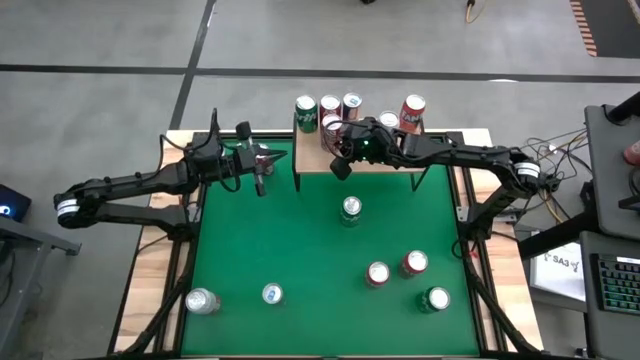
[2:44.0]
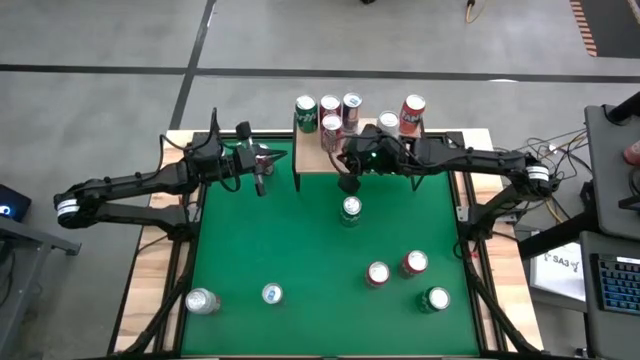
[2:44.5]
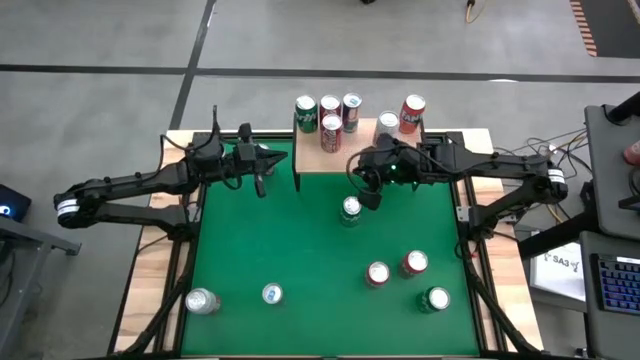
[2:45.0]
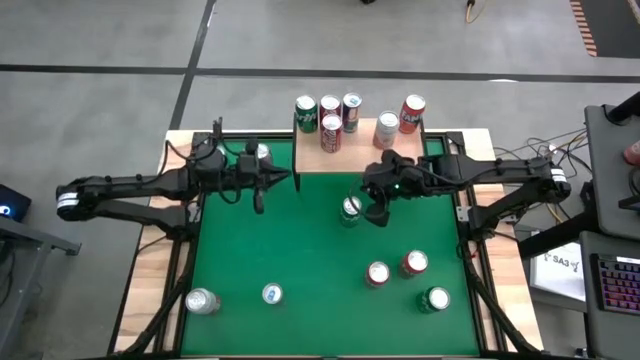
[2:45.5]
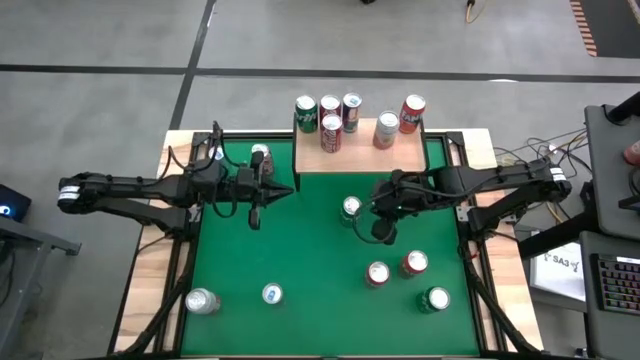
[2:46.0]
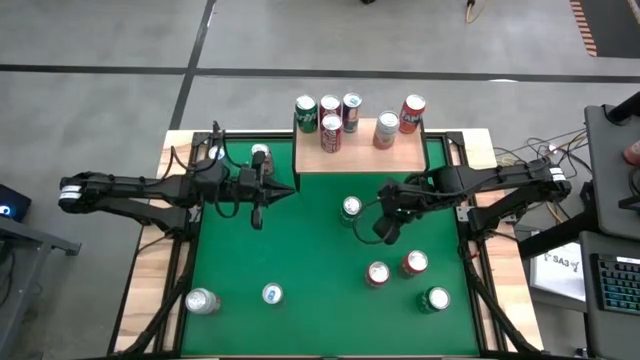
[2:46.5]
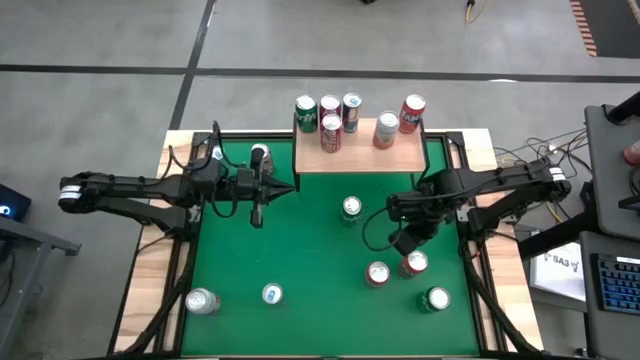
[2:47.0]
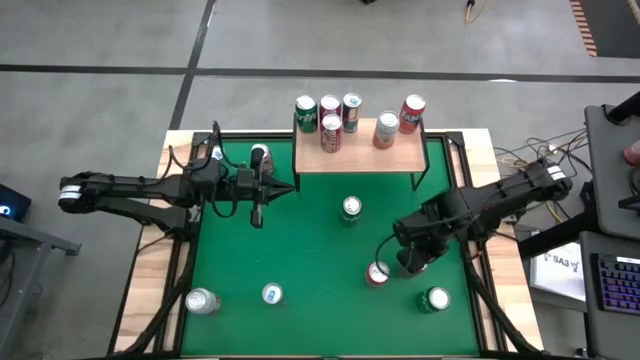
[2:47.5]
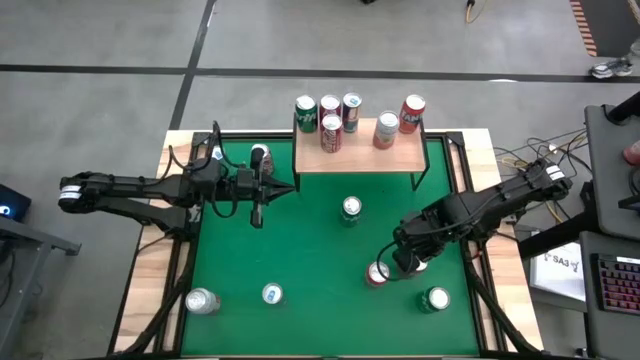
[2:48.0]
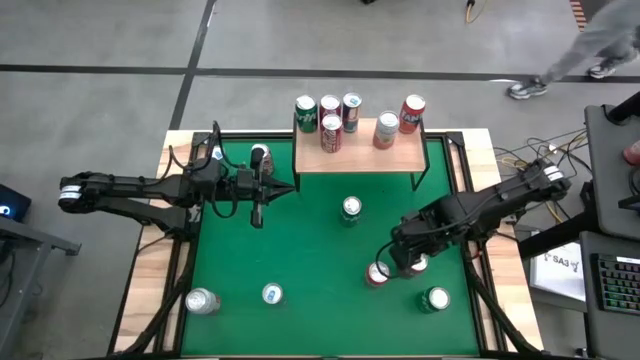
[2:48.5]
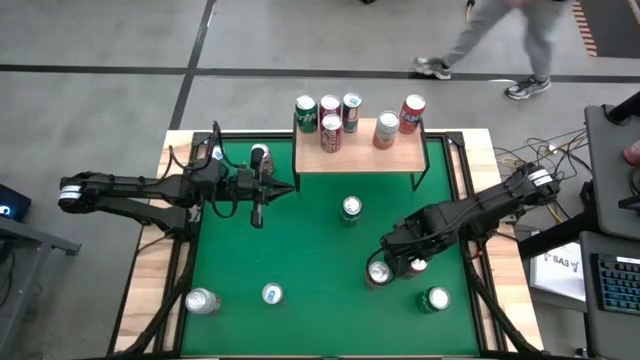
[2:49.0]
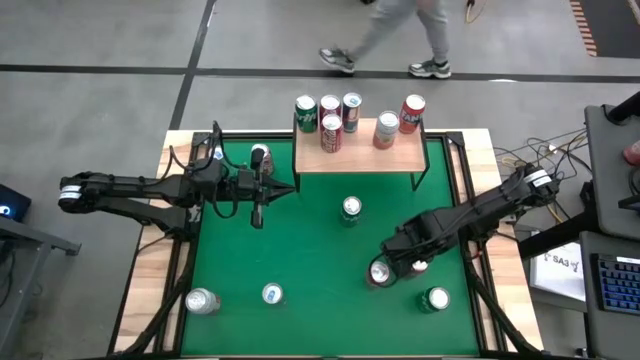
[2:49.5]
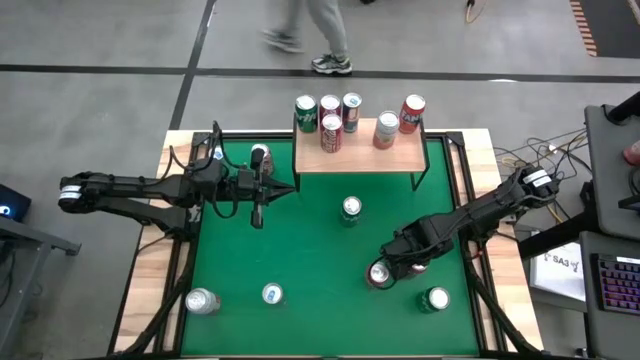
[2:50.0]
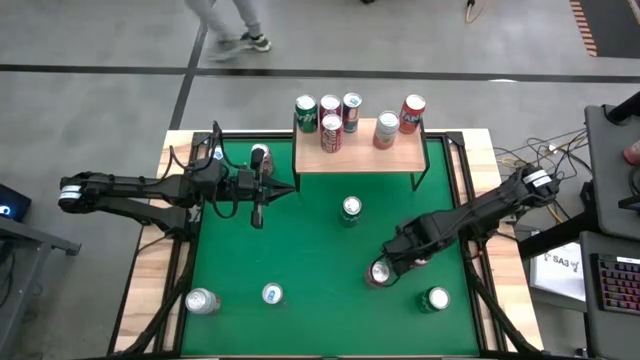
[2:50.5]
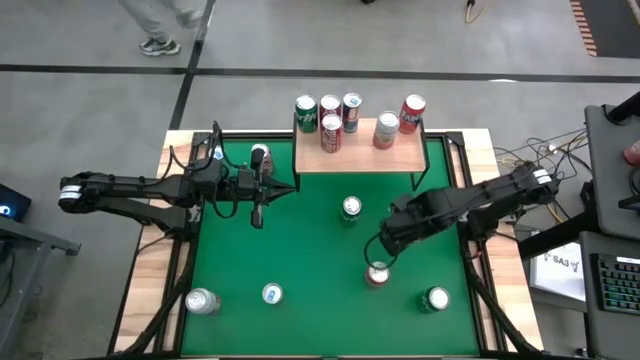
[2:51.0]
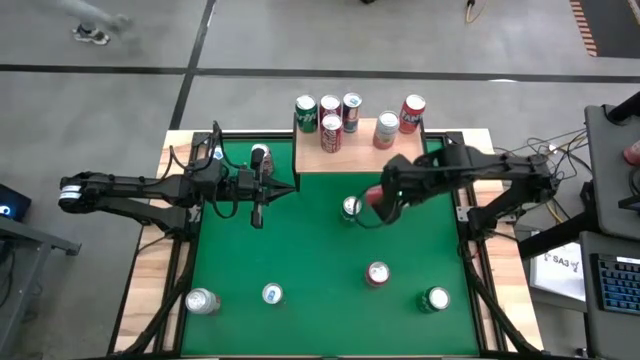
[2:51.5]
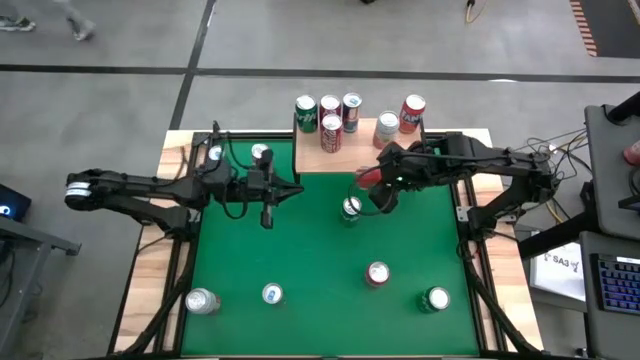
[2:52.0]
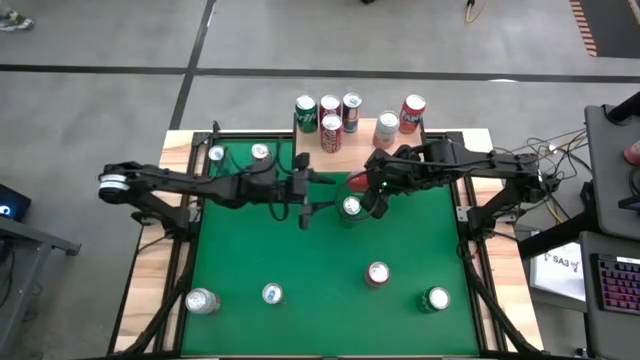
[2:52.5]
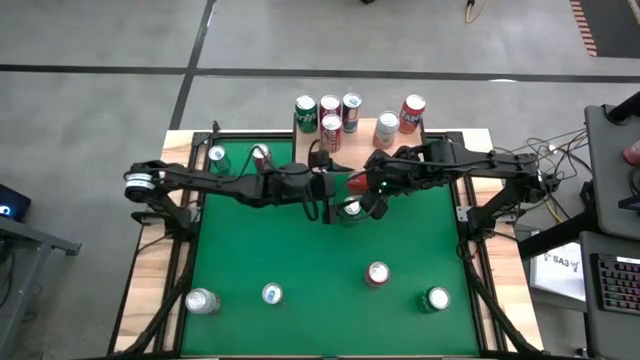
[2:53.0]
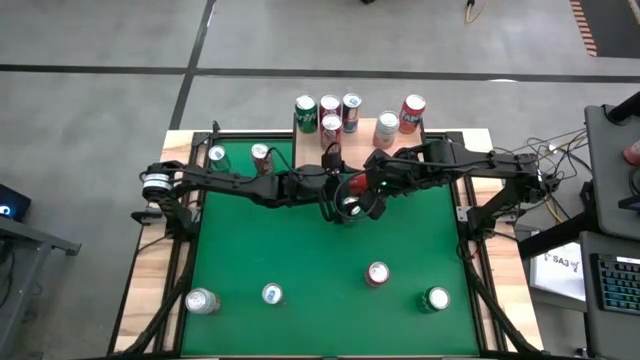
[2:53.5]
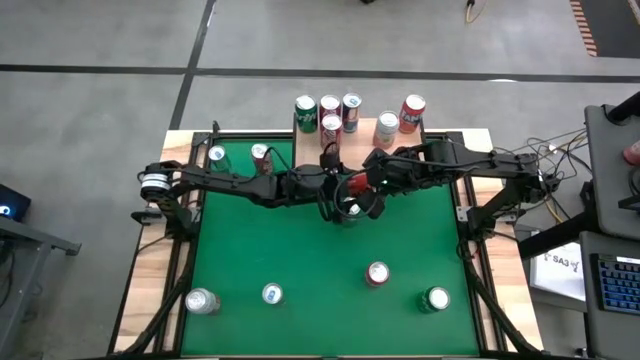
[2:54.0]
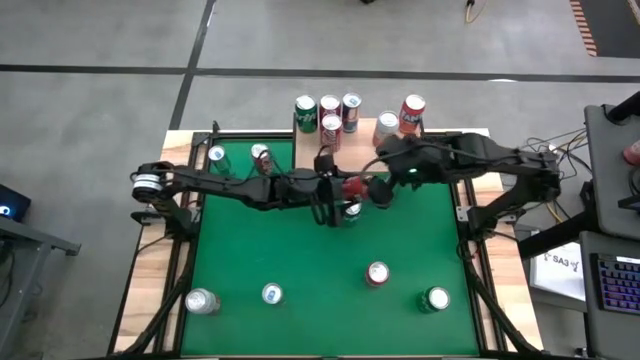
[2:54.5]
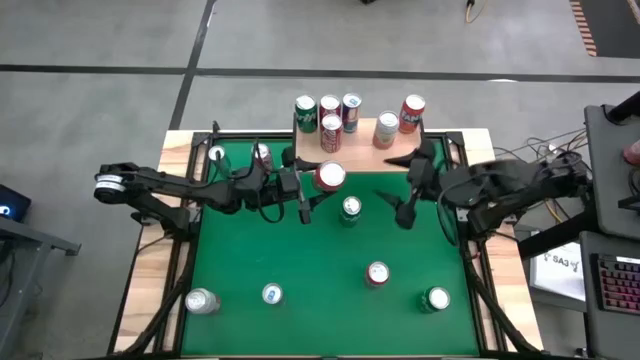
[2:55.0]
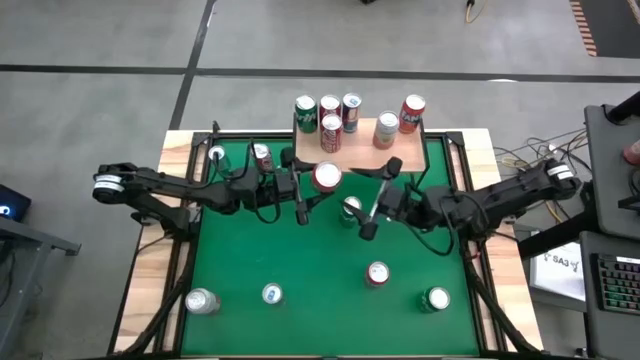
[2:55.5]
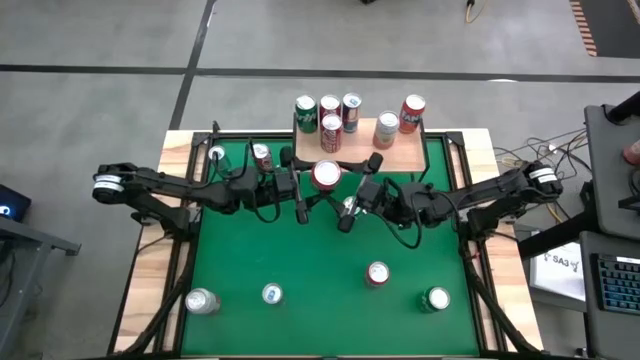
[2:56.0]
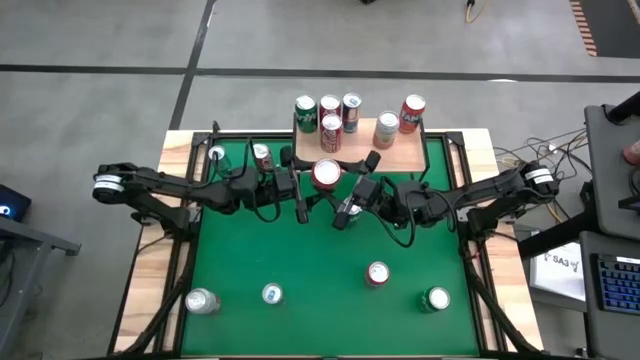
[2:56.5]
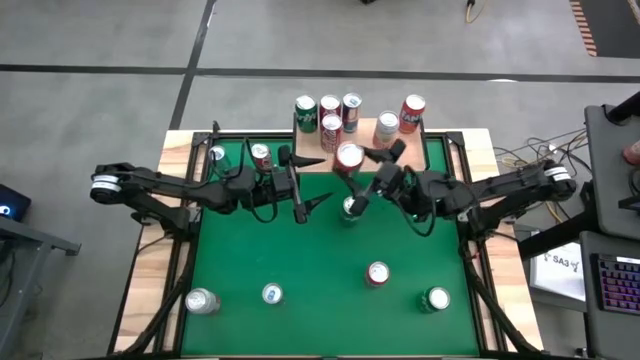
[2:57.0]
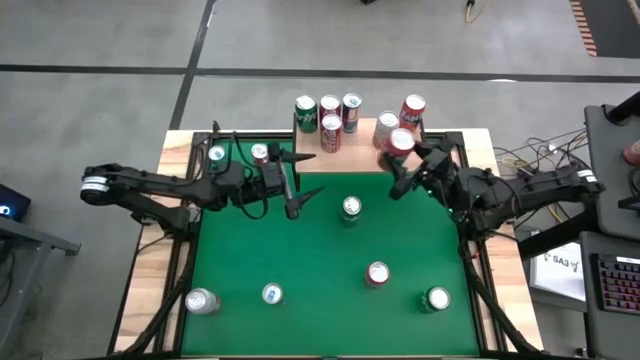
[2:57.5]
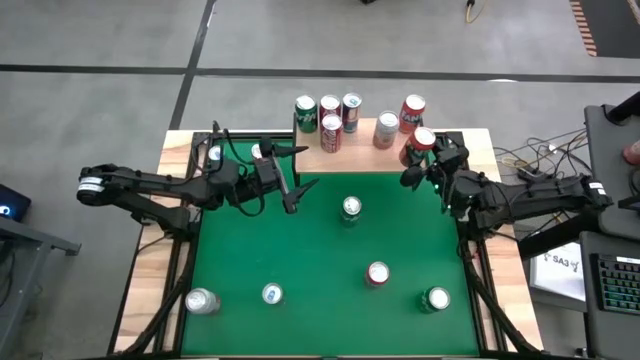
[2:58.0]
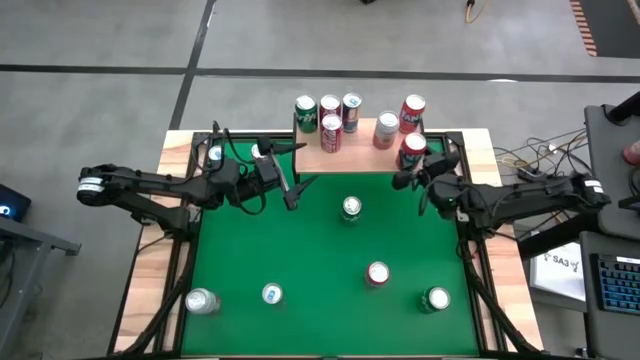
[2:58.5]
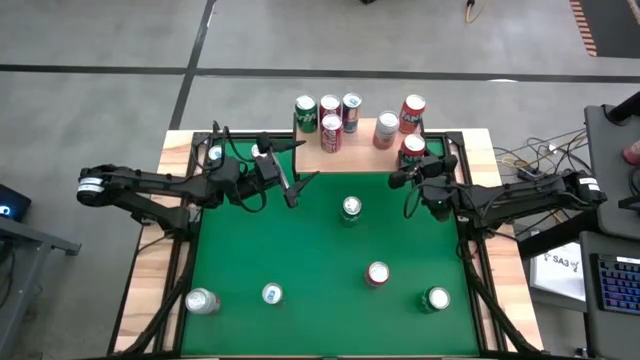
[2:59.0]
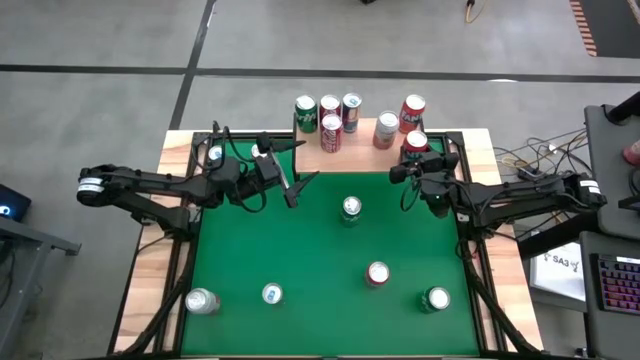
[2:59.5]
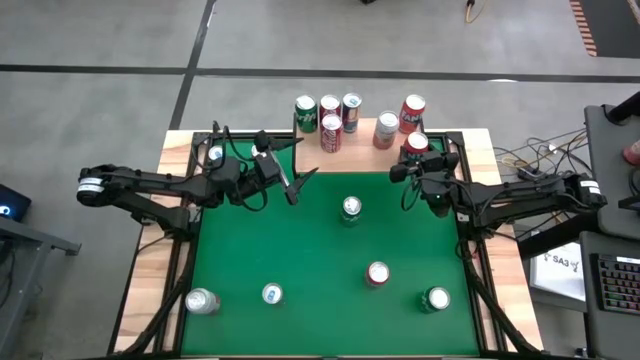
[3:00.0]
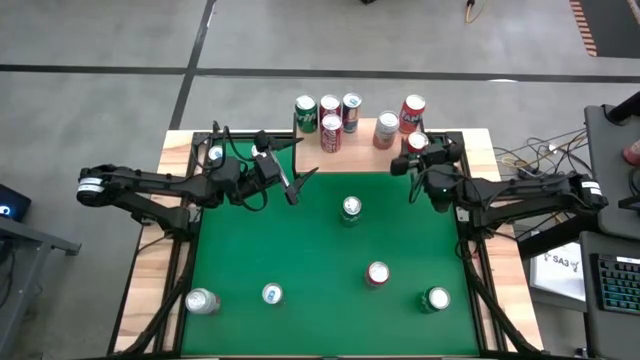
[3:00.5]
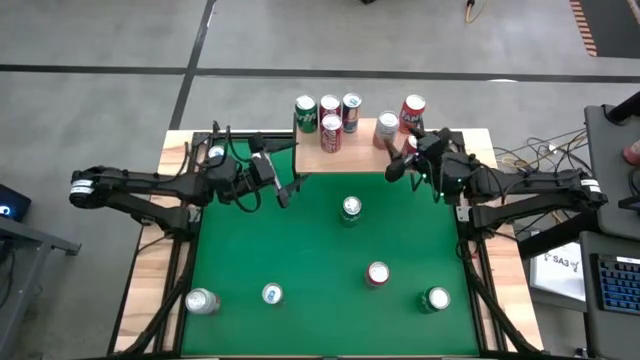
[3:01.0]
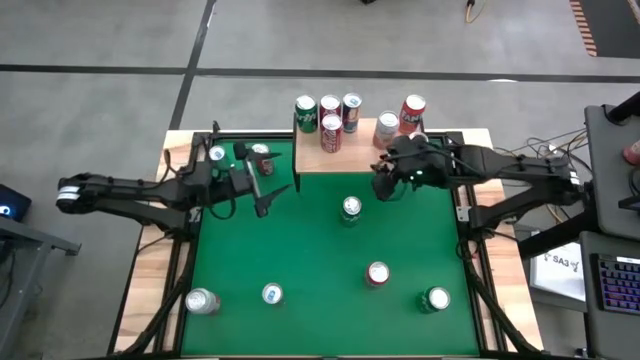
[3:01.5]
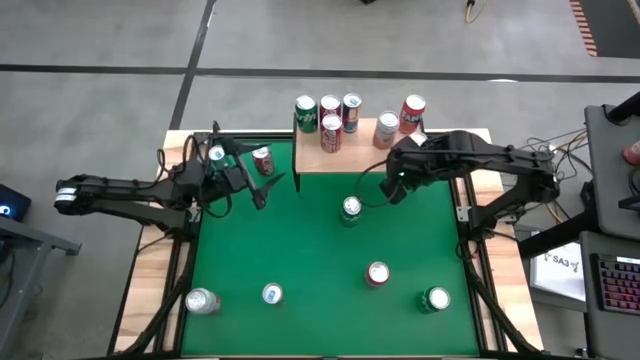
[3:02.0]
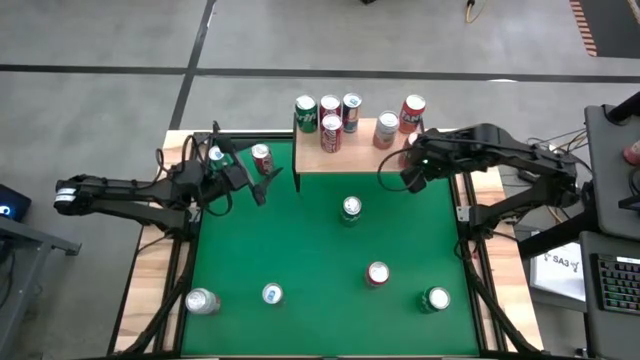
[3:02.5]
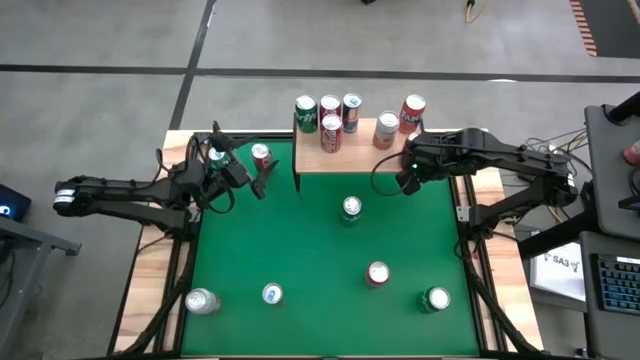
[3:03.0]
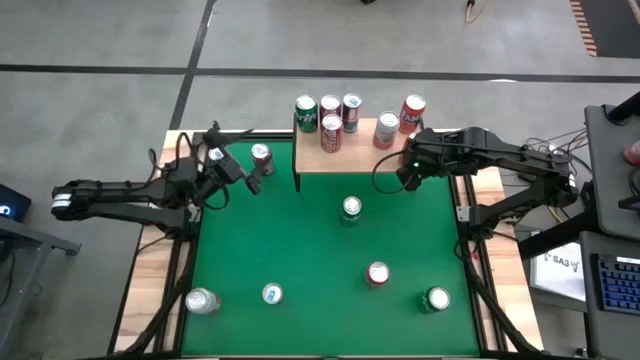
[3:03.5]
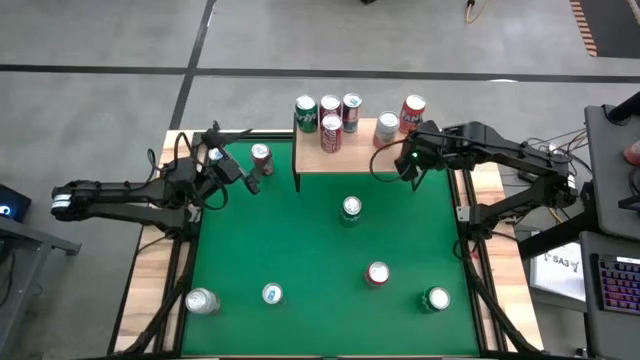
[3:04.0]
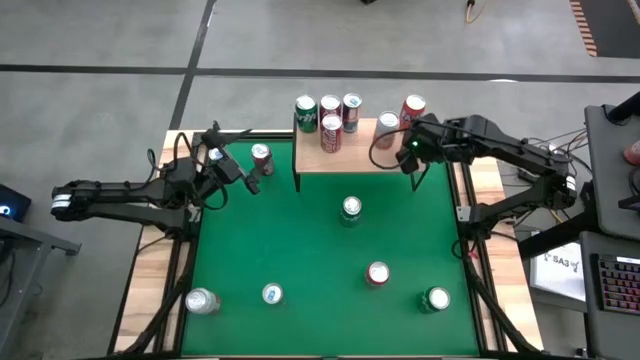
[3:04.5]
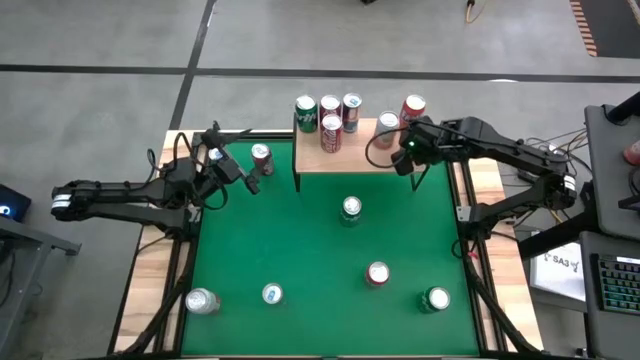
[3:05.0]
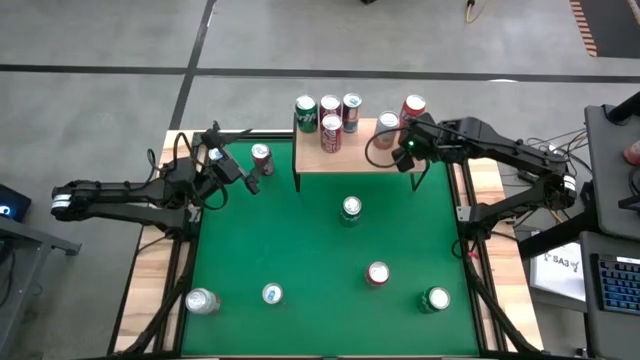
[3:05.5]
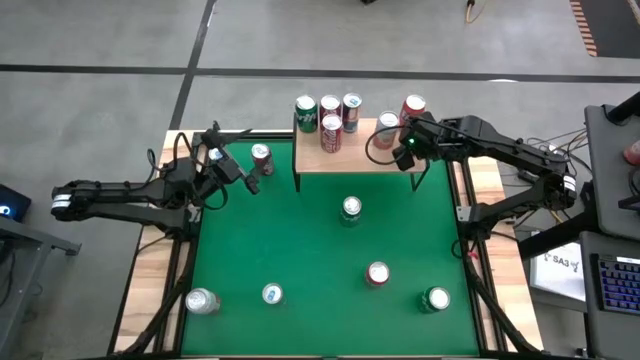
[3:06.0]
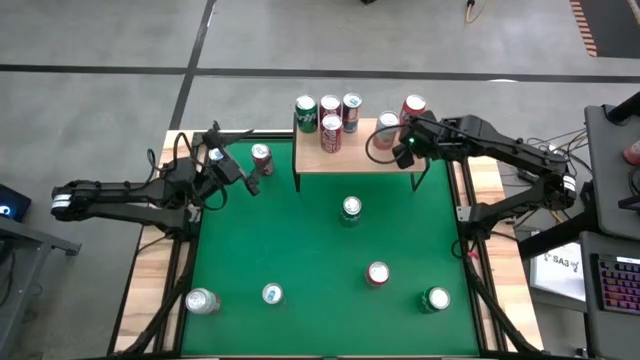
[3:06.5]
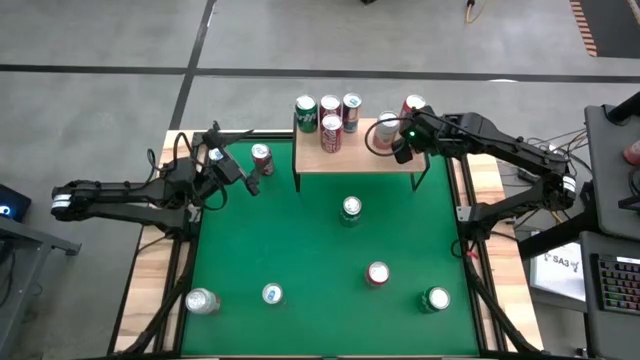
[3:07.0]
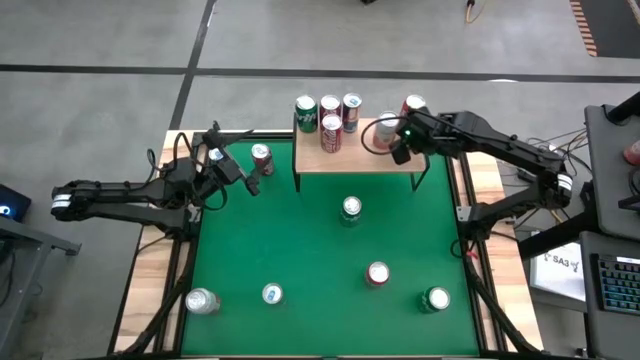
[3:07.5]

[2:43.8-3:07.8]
Task: Place canned beverage on shelf
Put the right red soda can aligned with the red soda can on the shelf
